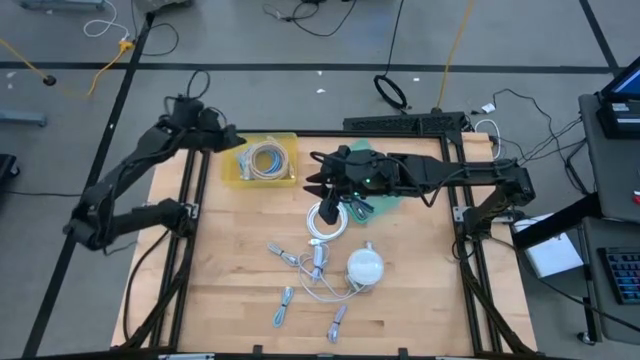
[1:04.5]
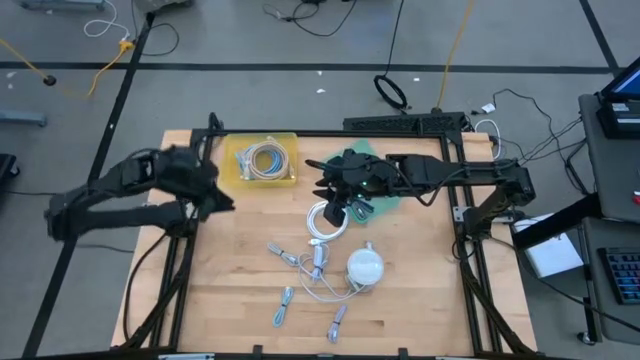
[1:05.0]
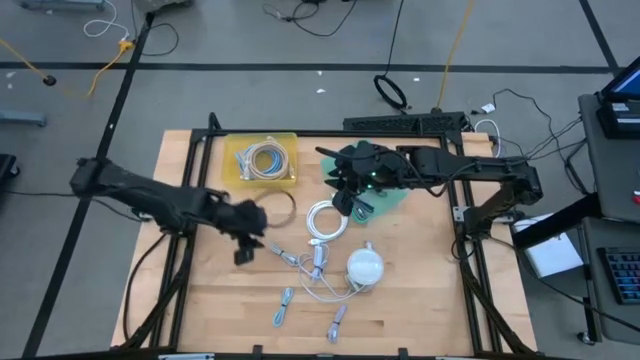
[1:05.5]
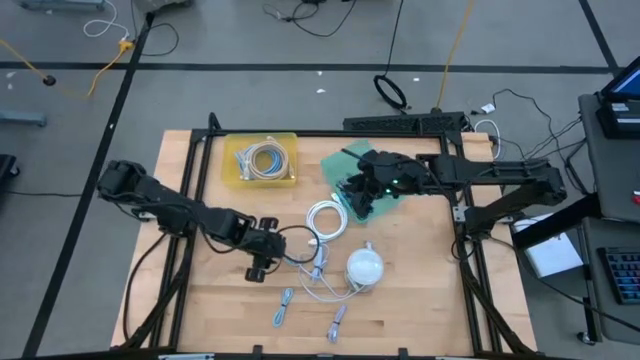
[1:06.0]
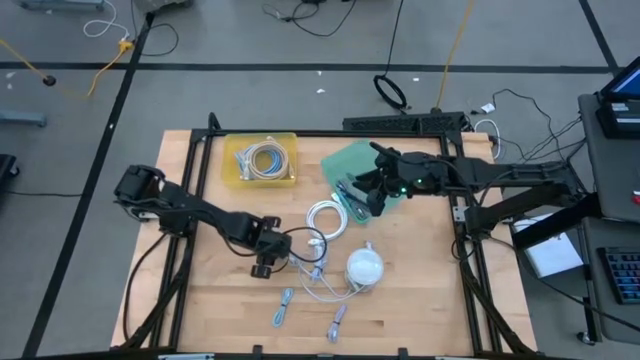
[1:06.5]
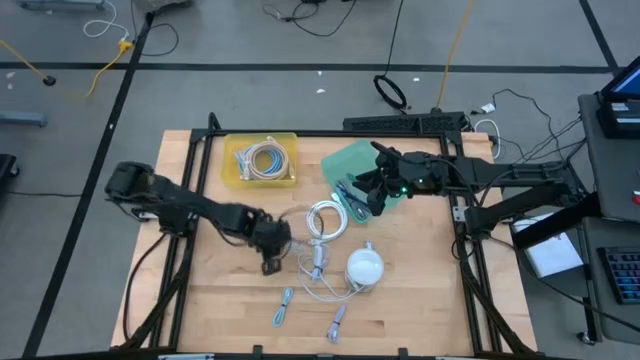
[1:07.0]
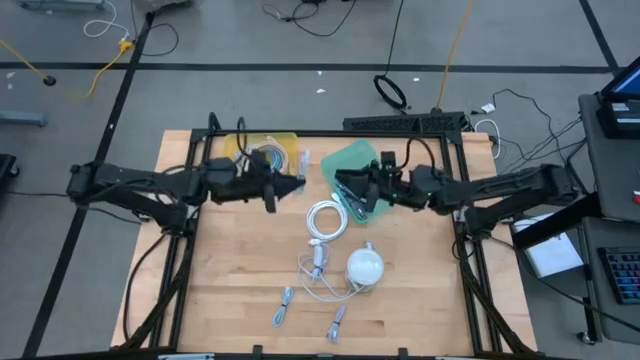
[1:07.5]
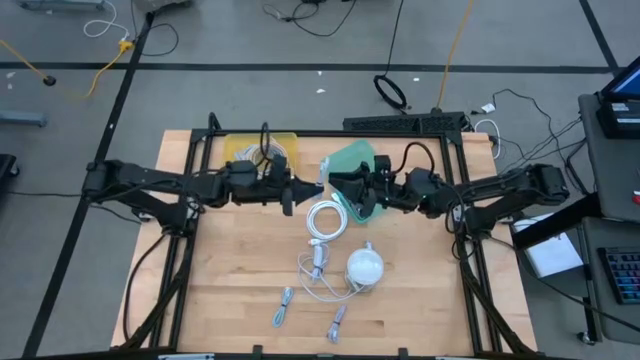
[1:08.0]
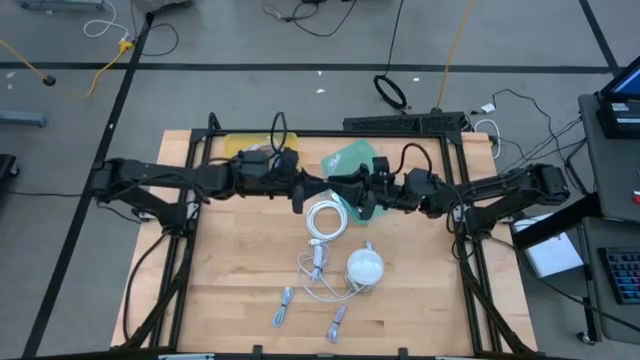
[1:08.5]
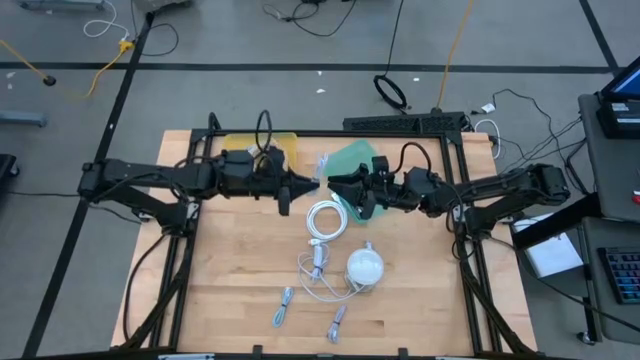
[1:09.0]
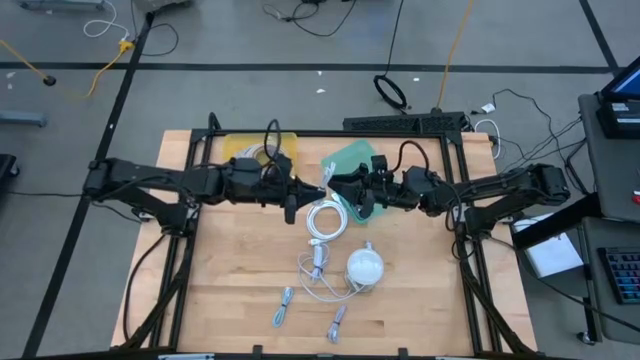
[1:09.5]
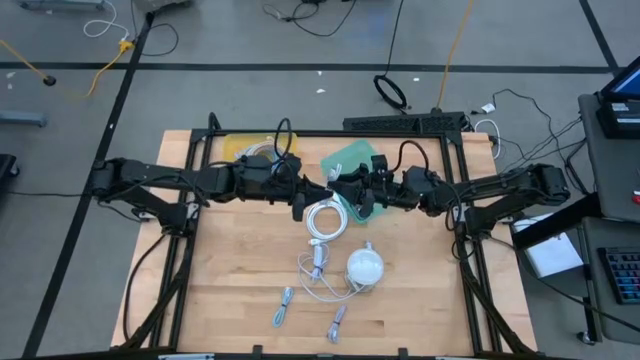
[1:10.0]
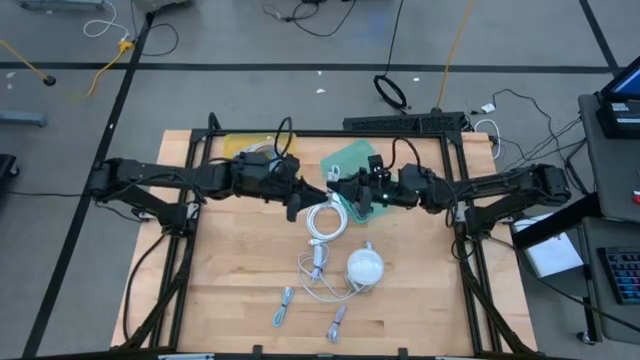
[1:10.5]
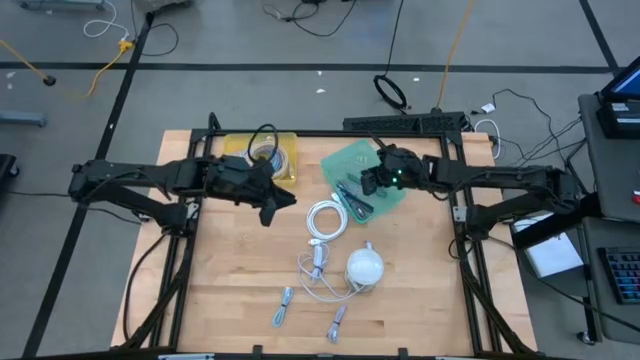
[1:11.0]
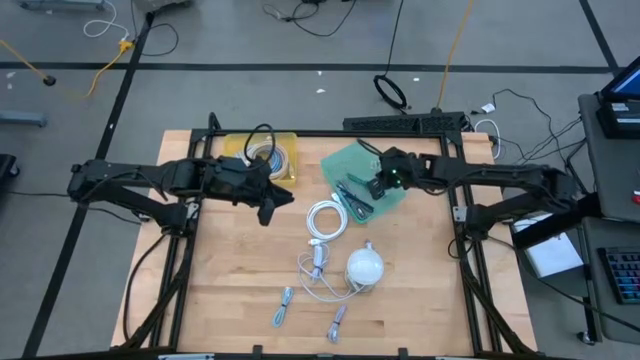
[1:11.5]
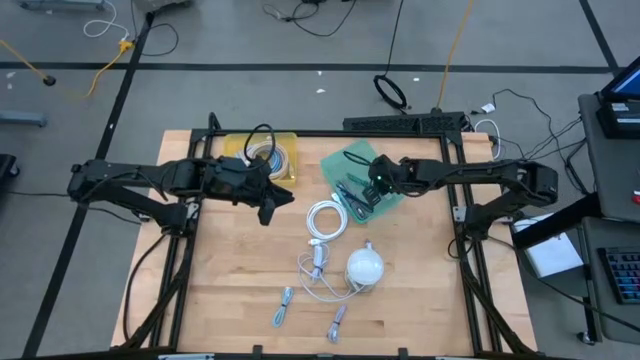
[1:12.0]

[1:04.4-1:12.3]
Task: Pick & Place USB Port
Put the white charger cable into the green bin

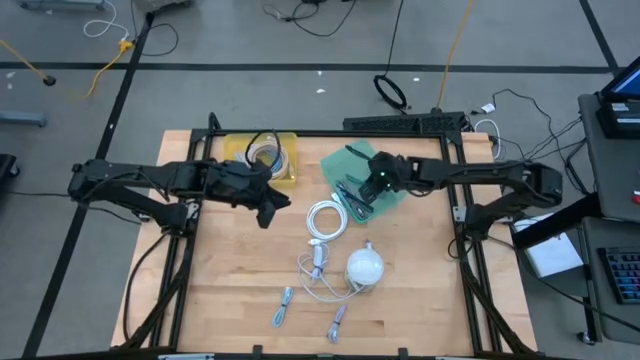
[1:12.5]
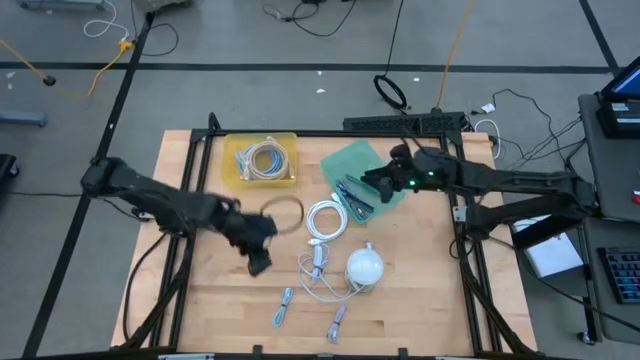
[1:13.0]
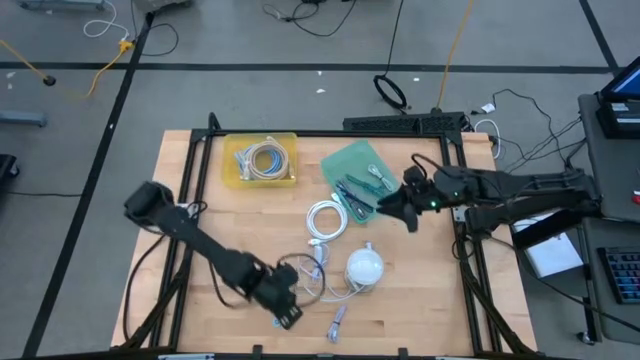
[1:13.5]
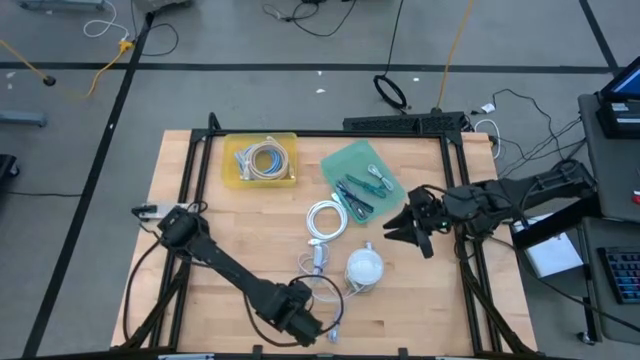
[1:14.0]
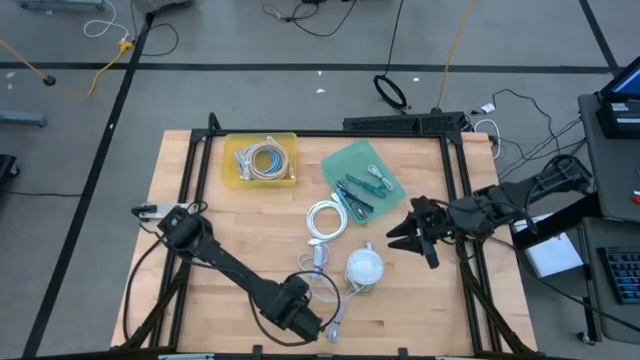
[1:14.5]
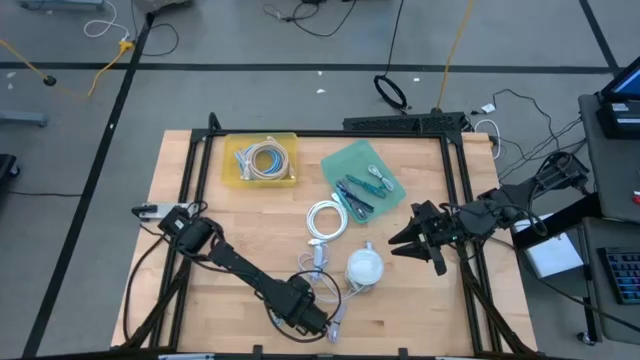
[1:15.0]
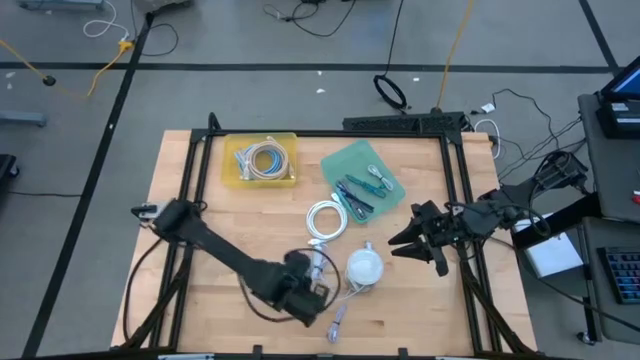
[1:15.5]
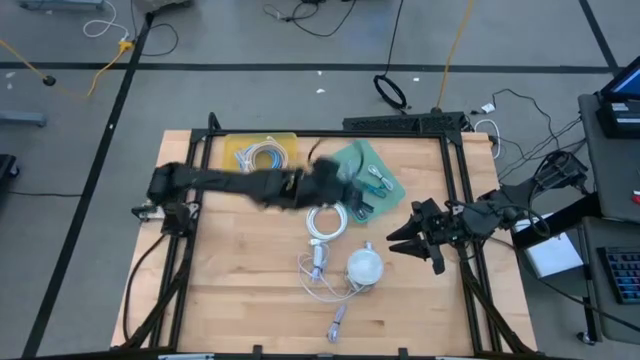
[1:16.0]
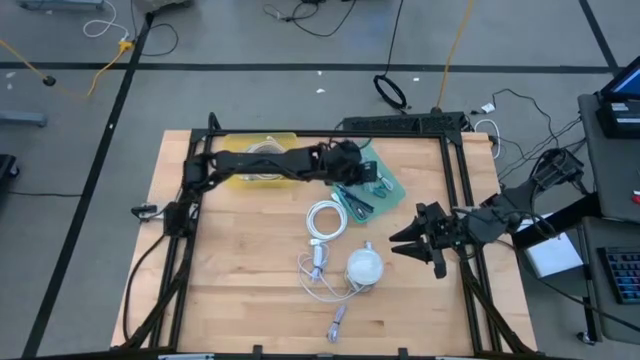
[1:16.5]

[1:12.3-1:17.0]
Put the light blue charger cable into the green bin

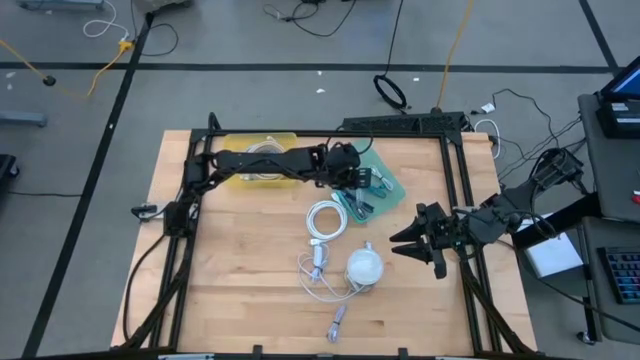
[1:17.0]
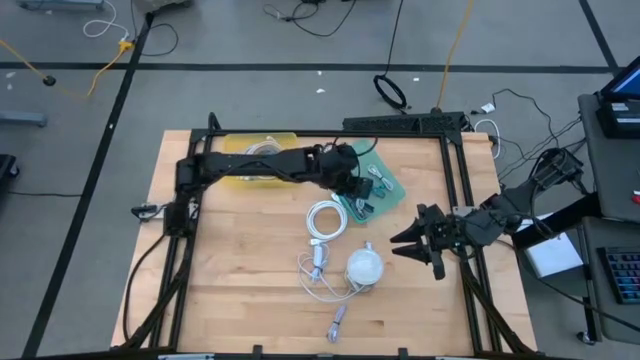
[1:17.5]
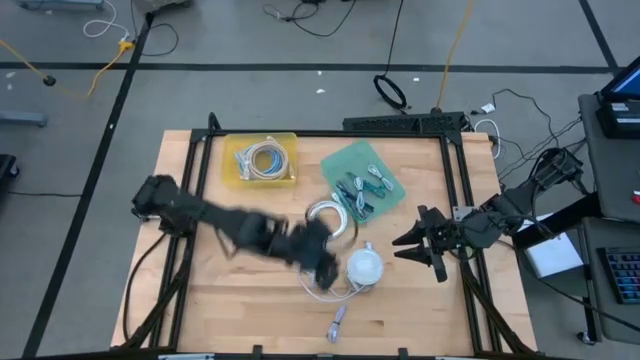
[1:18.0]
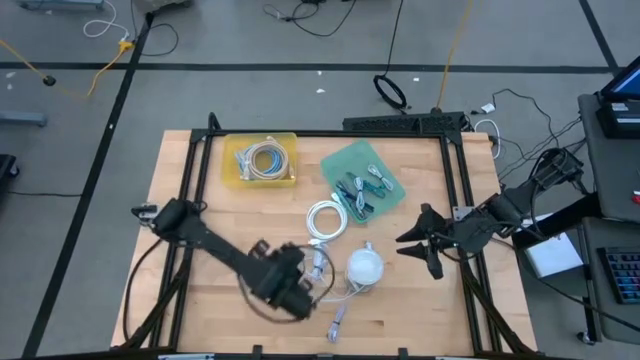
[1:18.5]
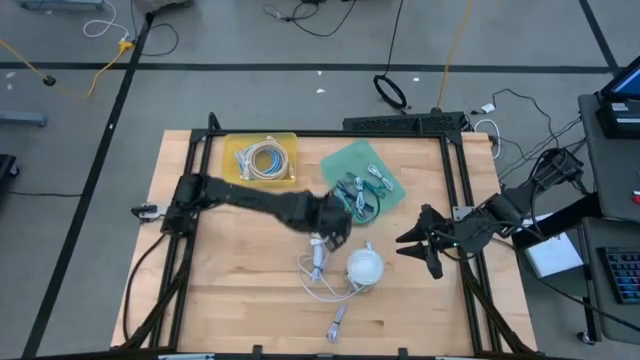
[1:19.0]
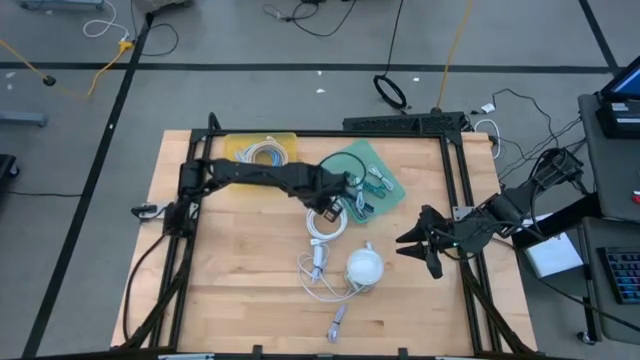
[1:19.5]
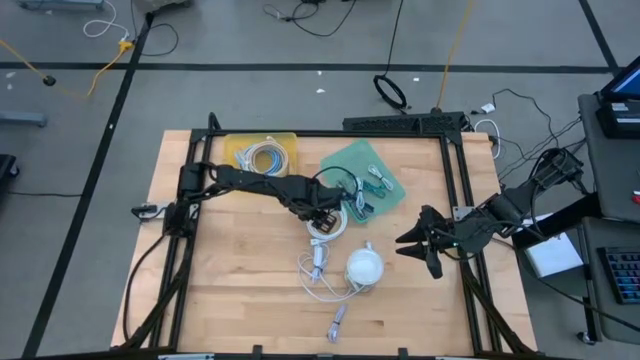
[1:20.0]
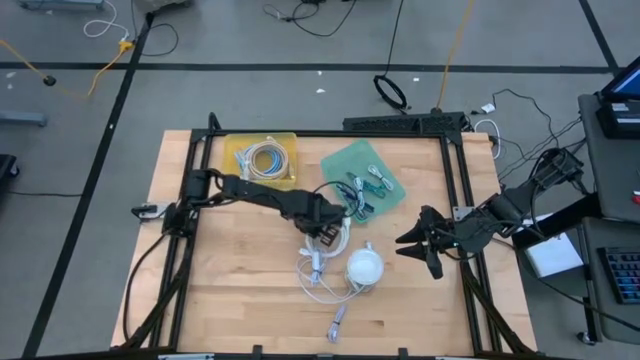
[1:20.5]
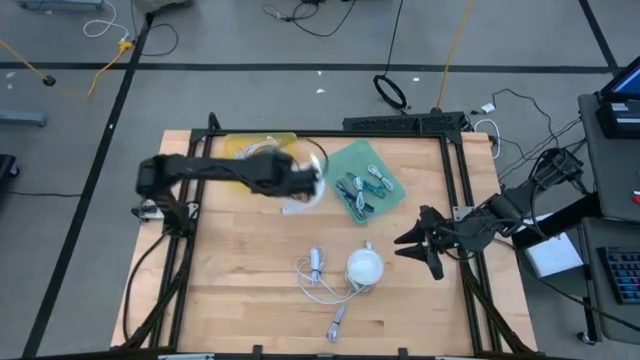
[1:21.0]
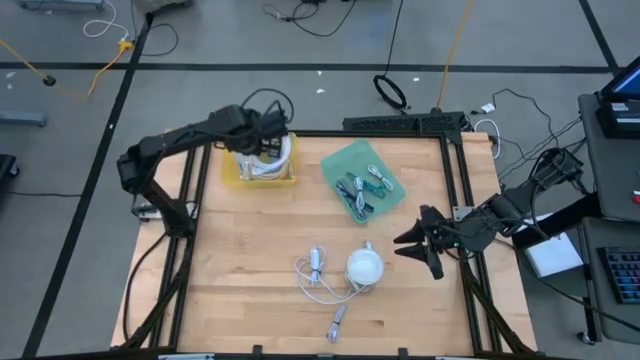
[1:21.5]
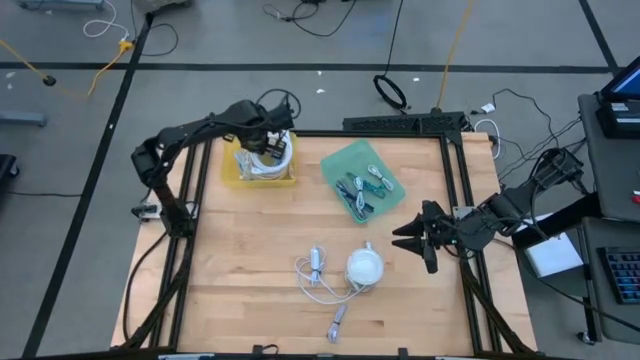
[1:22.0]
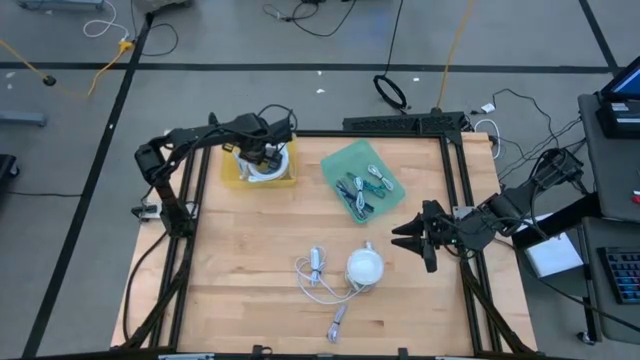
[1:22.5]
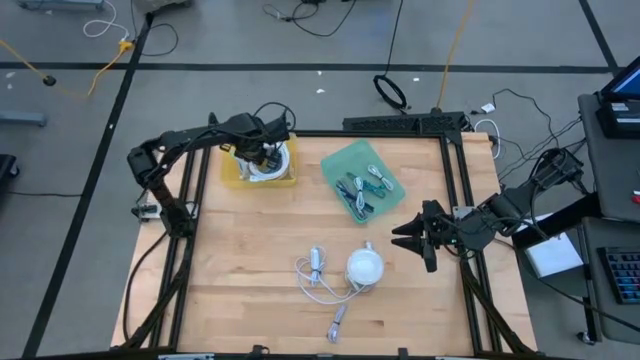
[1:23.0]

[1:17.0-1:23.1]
Put the white HDMI cable into the yellow bin

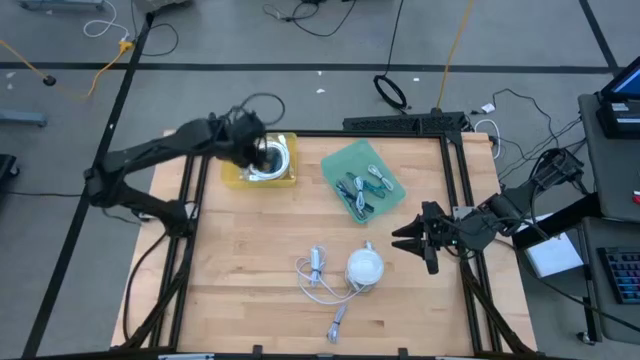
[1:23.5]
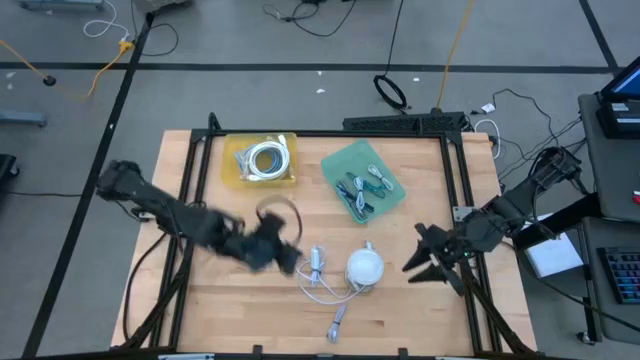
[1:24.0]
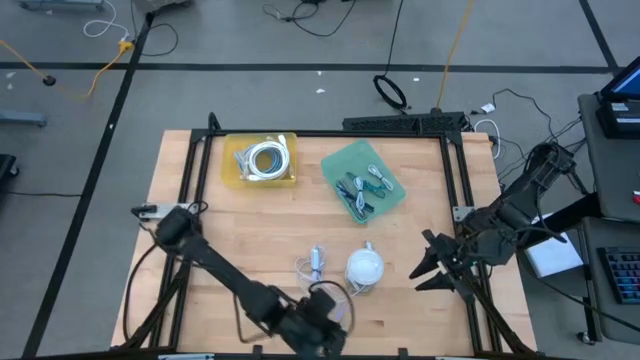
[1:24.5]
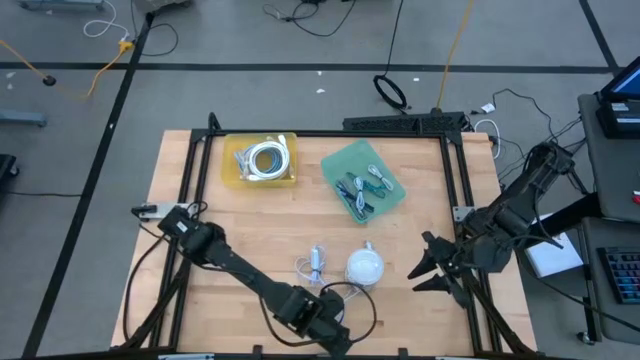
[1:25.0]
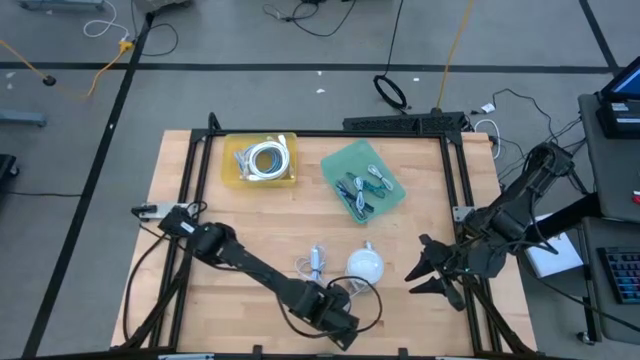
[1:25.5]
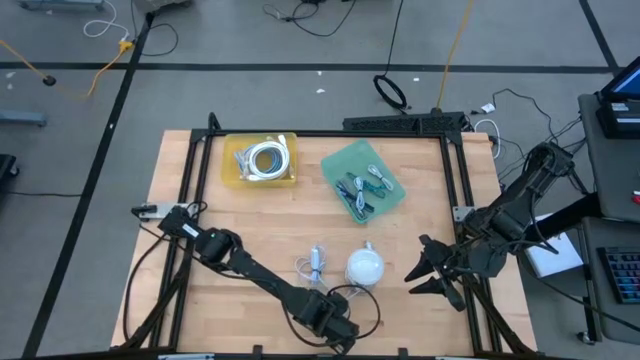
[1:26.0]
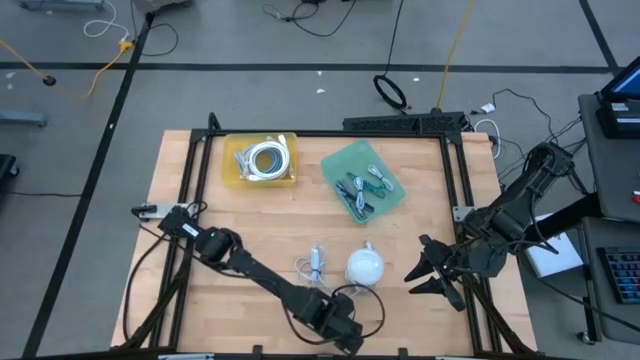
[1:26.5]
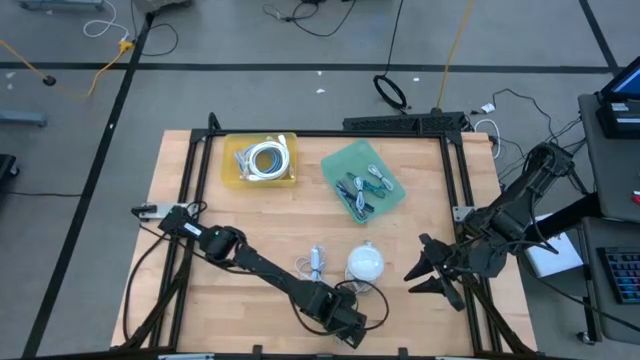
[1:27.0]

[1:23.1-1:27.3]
Put the purple charger cable into the green bin
